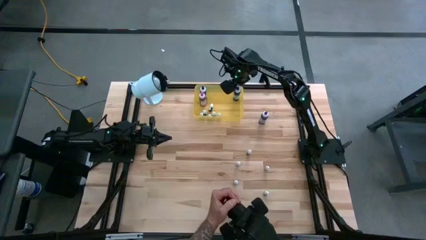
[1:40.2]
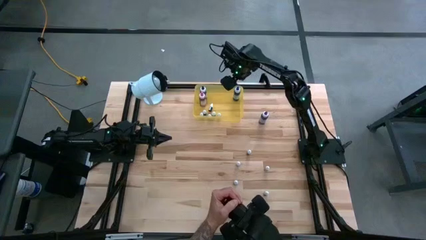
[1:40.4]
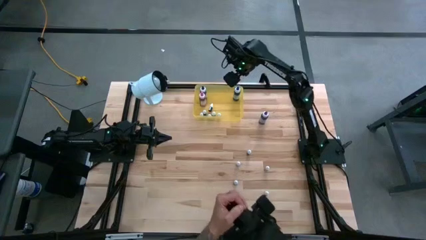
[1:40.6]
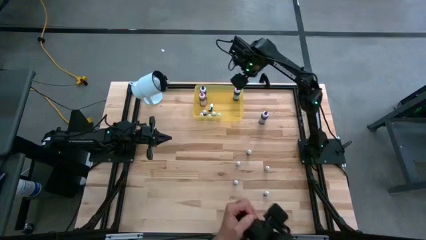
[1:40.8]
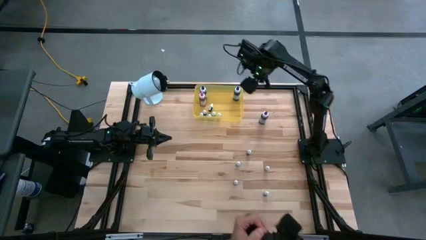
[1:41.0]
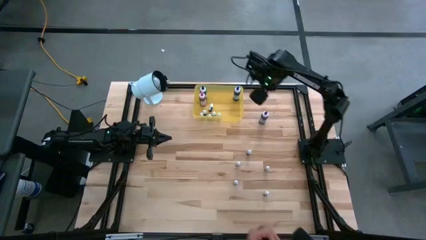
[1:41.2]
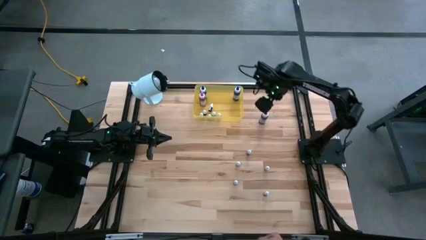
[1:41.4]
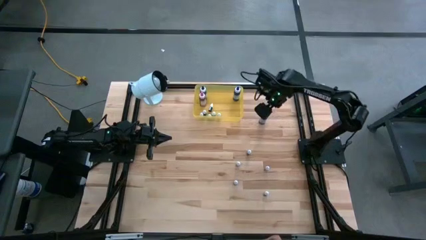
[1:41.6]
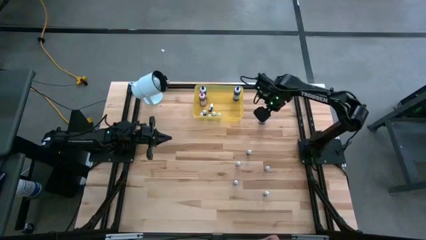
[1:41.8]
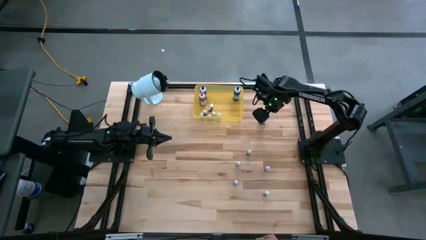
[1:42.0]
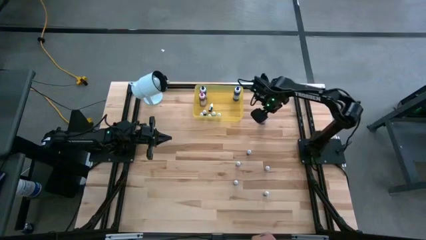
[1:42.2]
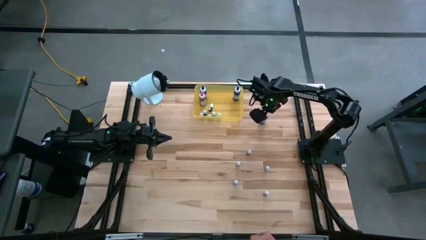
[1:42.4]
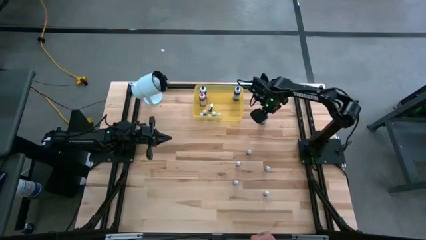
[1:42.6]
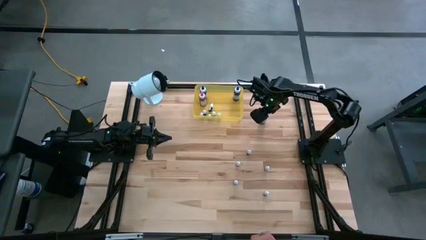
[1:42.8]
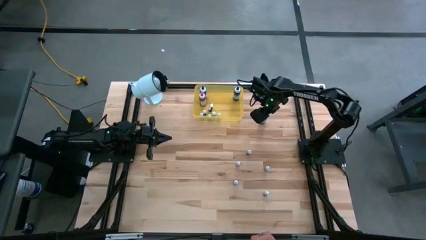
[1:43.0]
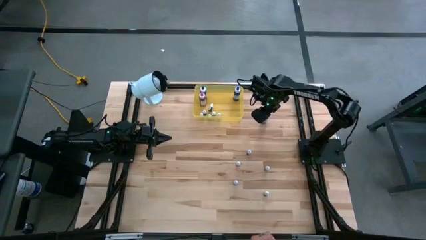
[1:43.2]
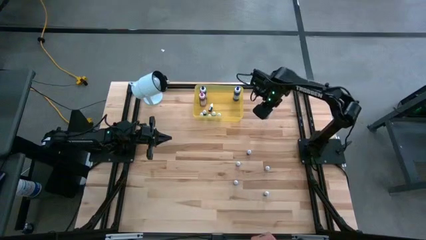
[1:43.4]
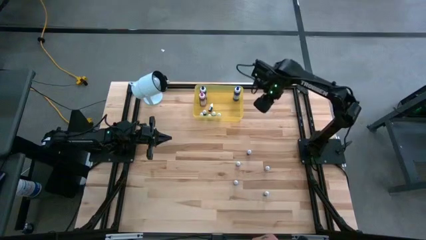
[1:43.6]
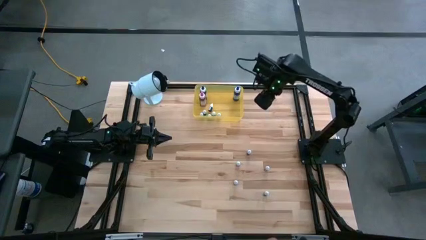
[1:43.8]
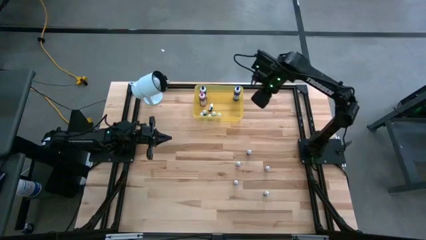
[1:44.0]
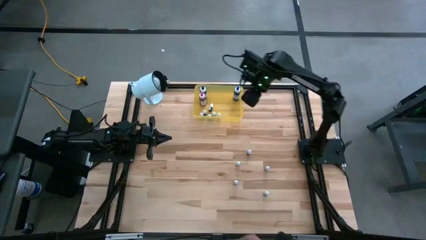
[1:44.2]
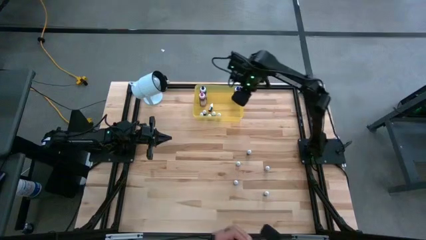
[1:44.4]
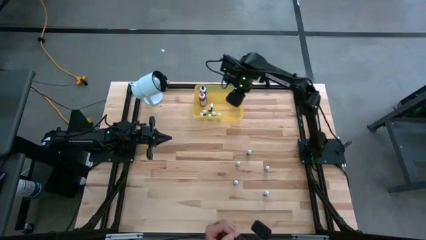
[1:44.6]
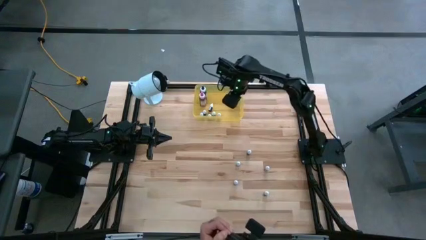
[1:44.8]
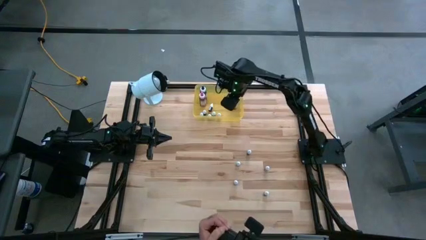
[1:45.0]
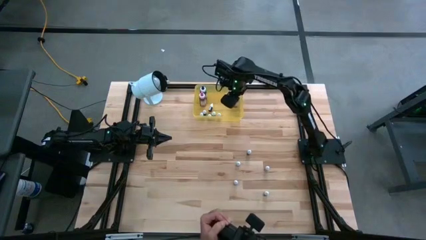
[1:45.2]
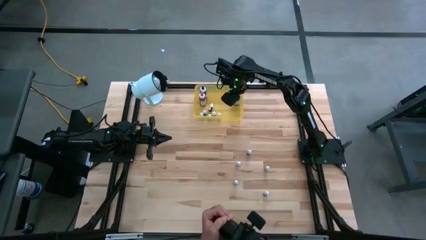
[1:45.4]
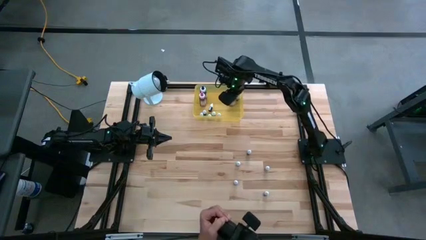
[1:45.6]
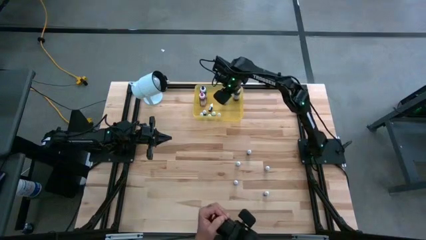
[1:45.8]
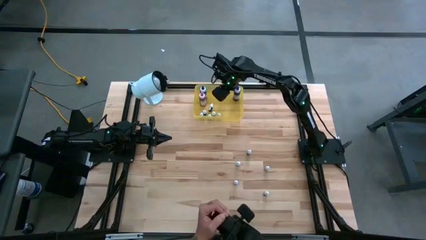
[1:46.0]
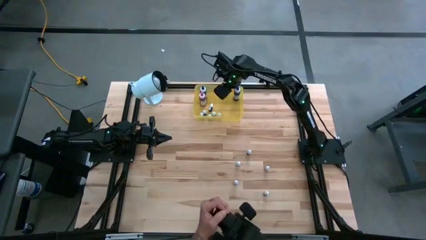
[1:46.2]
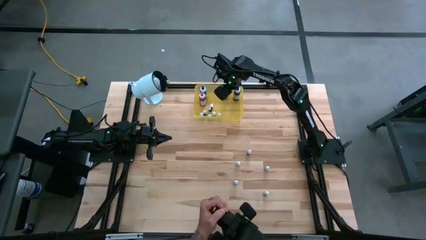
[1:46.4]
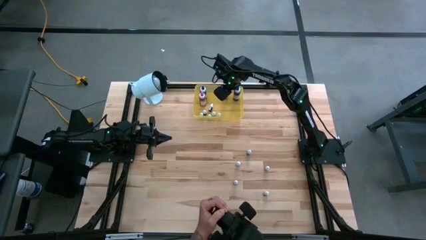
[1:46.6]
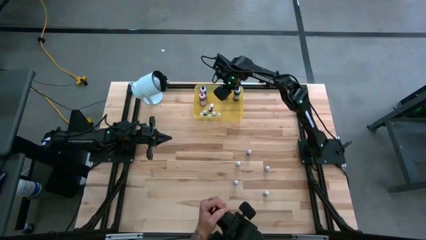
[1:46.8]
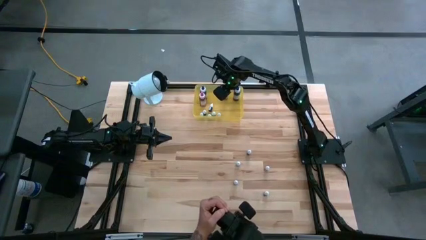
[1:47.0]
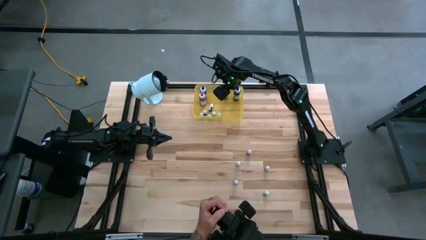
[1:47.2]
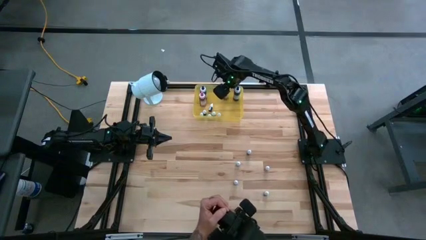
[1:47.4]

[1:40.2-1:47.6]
Task: Pick & Place food coloring
Put the large violet food coloring bottle into the yellow container

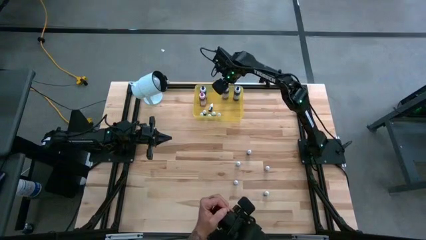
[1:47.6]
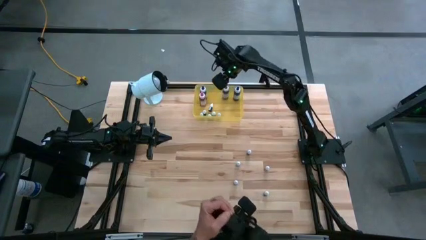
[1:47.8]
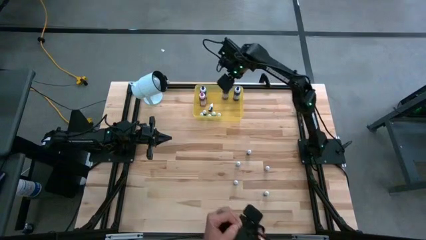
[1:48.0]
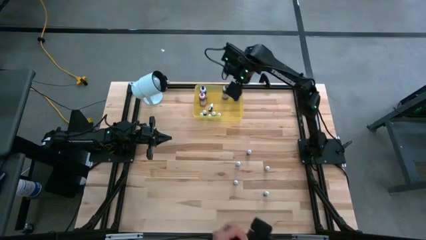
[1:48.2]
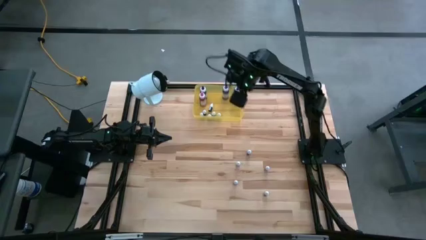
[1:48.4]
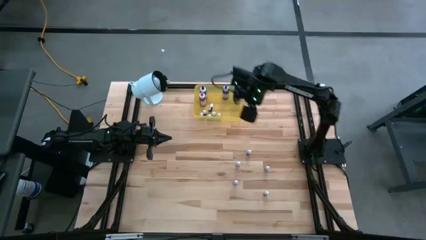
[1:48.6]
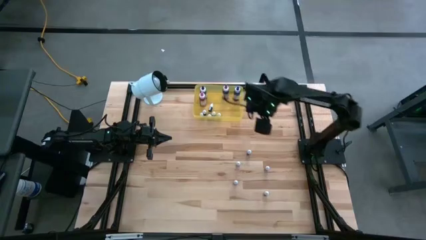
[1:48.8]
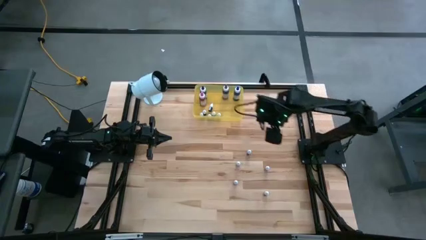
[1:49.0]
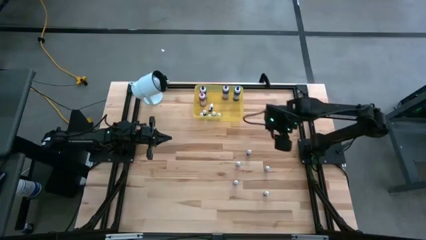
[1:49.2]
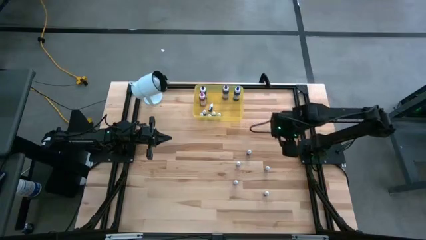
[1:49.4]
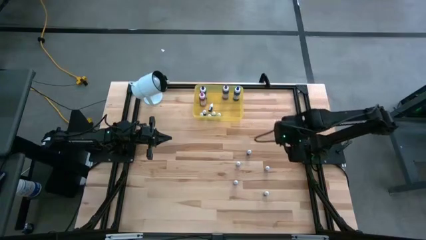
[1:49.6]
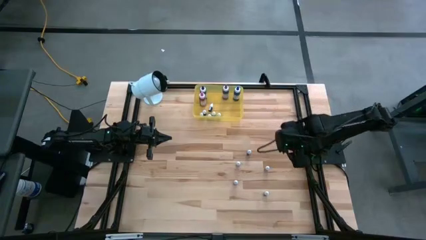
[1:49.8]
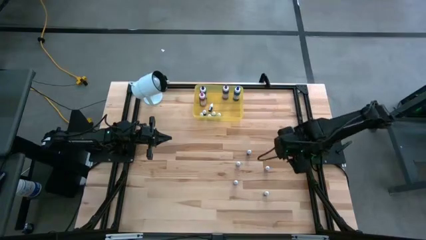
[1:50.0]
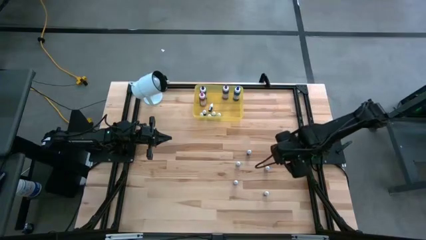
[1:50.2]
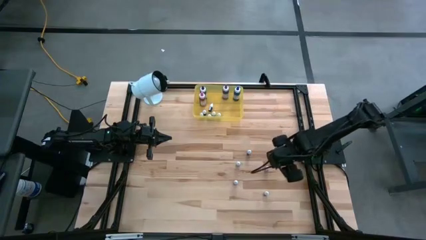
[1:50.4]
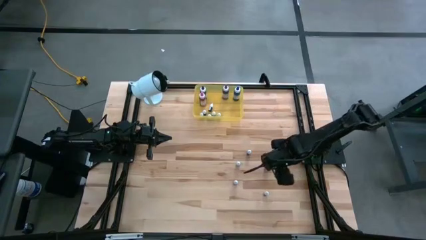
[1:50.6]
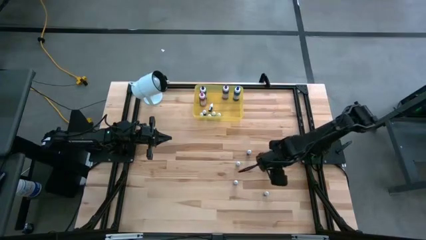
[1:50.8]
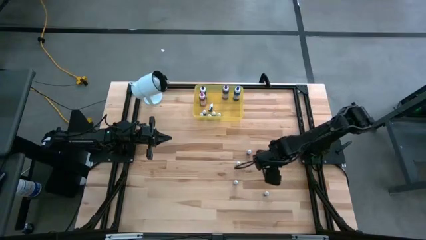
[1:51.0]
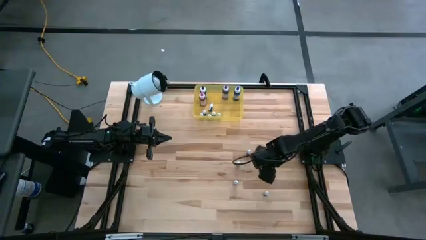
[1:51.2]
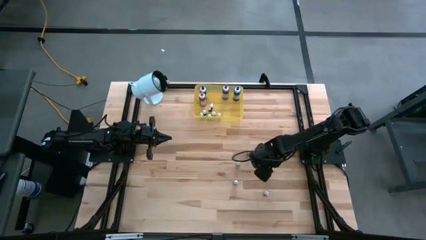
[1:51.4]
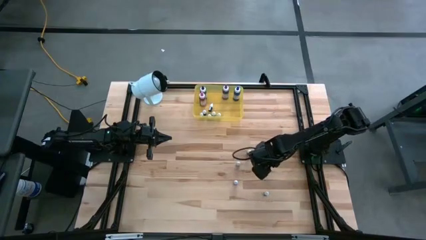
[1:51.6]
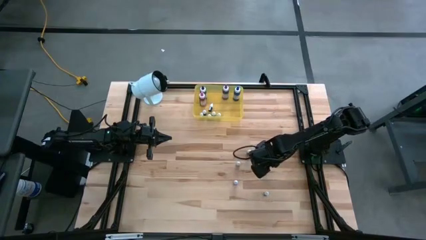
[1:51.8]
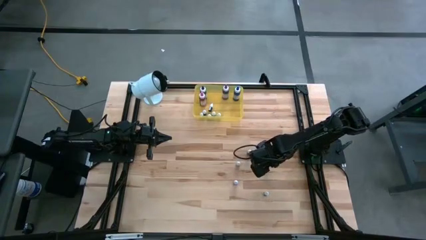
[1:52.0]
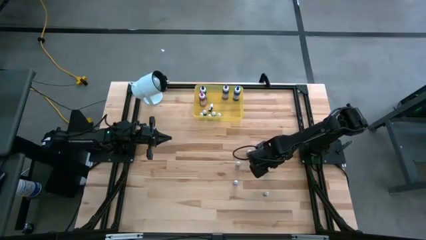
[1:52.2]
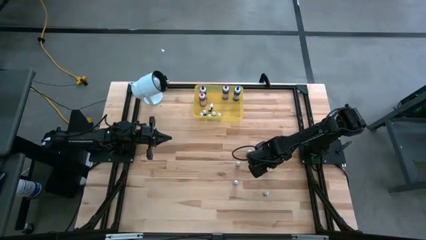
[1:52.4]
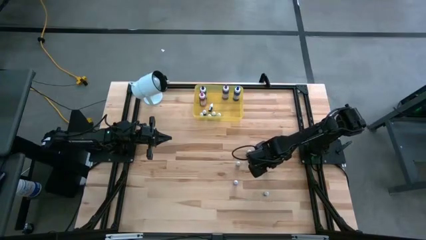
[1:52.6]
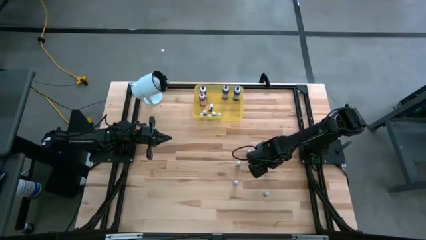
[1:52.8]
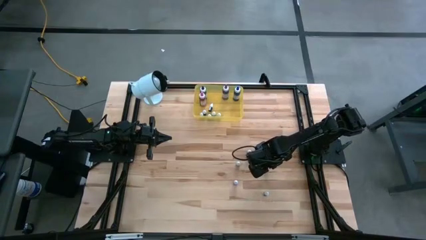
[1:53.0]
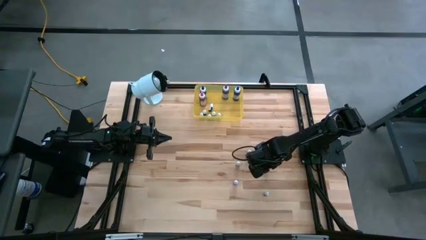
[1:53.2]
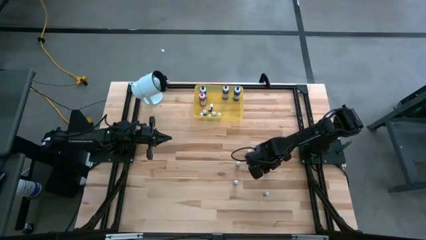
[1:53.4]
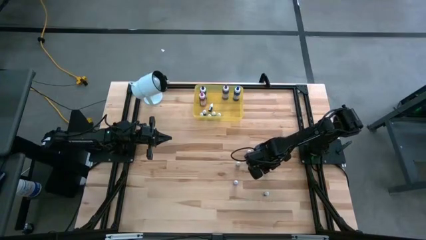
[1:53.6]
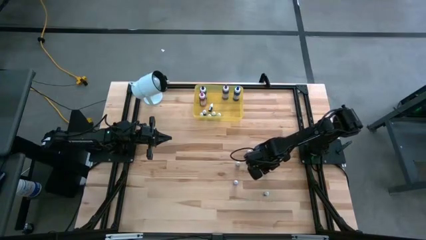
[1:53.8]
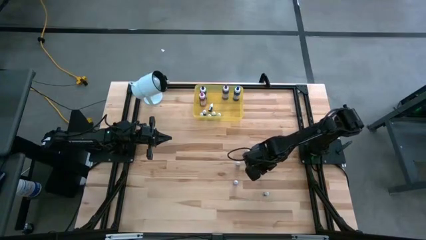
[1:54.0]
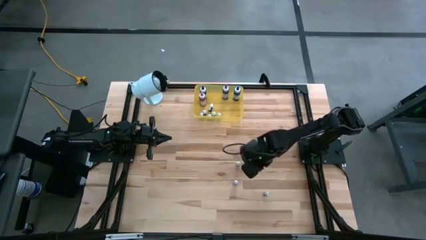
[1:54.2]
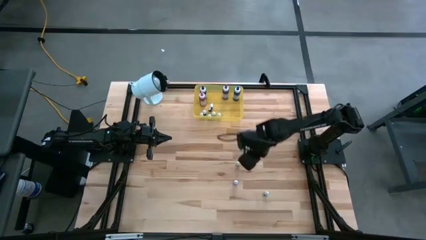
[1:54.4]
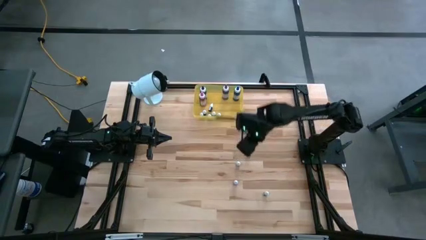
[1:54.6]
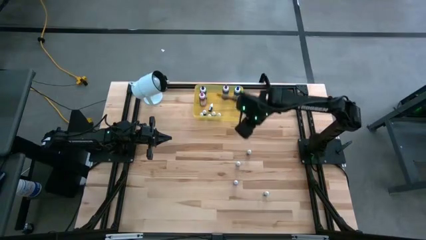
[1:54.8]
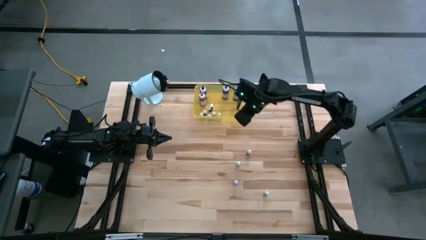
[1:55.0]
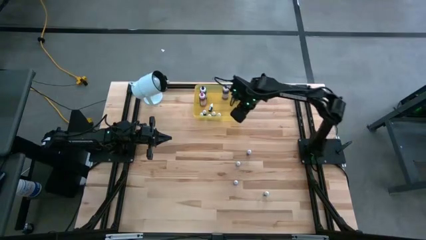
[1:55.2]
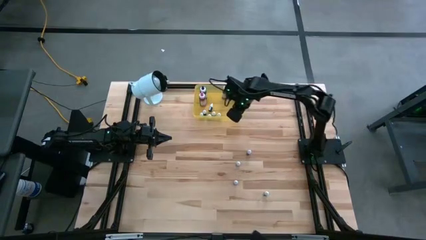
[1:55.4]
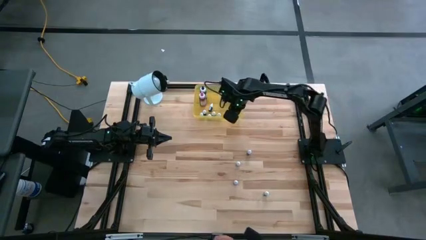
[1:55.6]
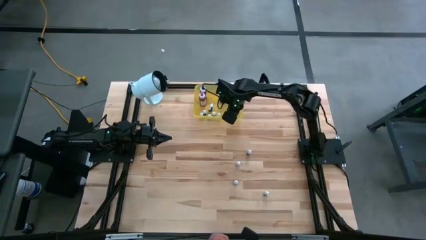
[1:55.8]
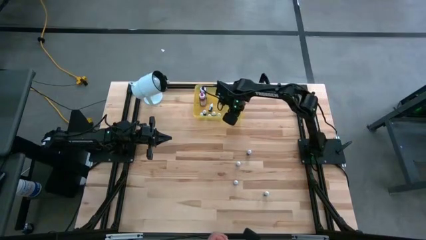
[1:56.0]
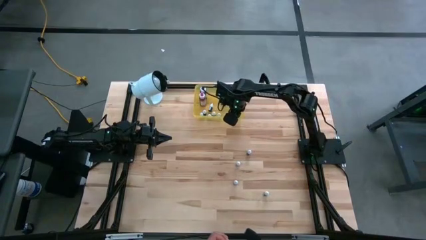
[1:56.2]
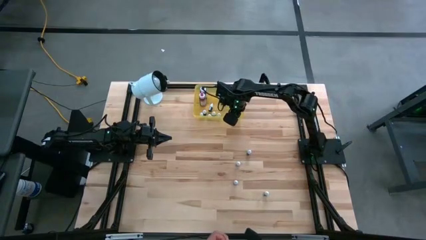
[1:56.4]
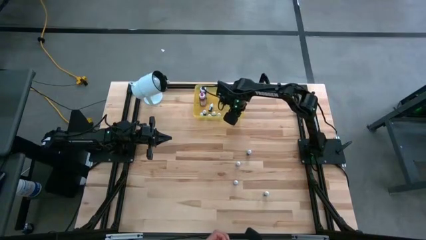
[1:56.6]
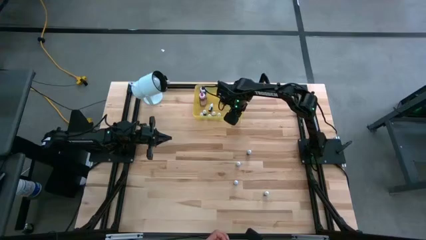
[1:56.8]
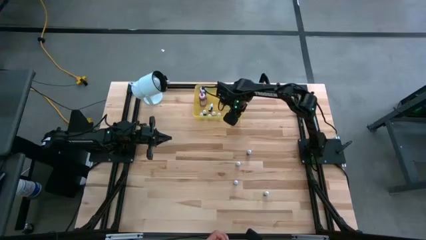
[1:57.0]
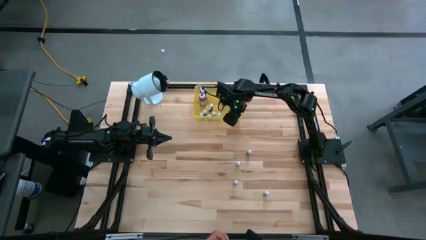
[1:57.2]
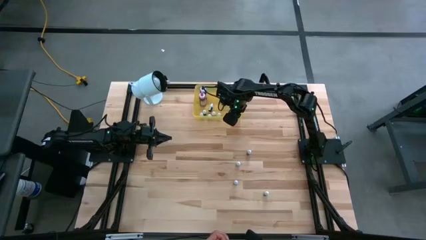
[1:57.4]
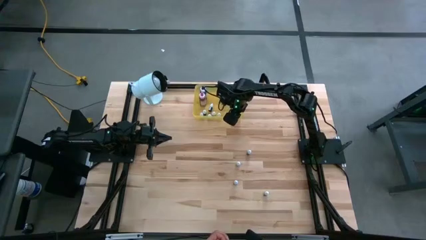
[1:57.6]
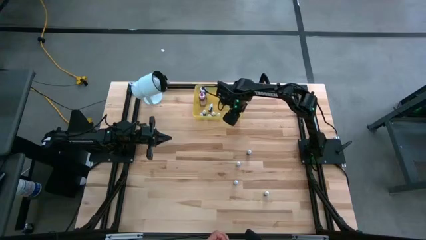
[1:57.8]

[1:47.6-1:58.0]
Put the small orange food coloring bottle into the yellow container
